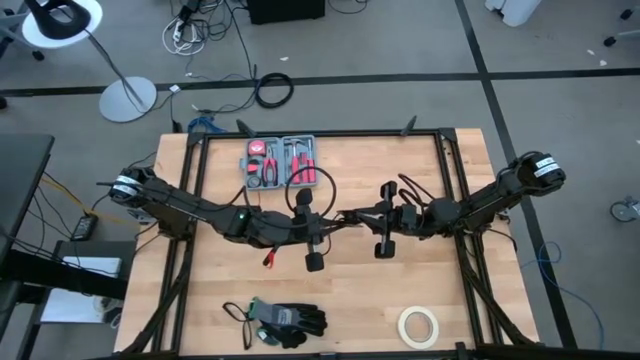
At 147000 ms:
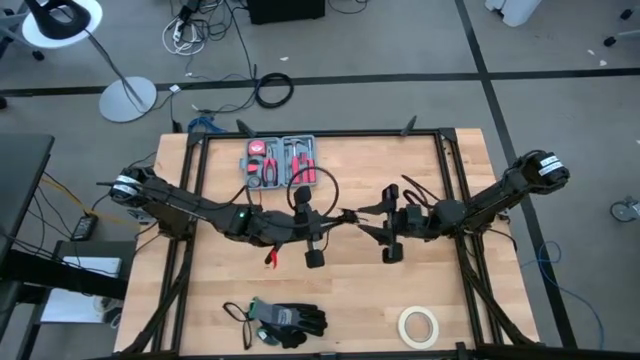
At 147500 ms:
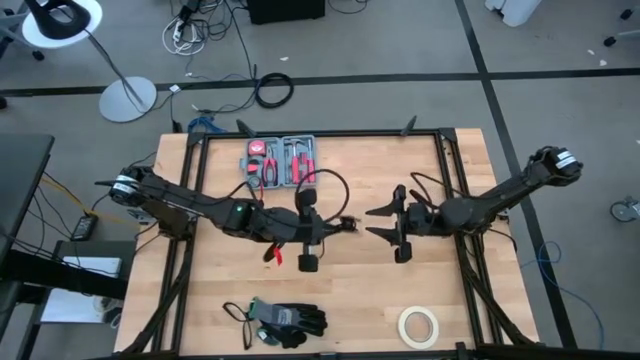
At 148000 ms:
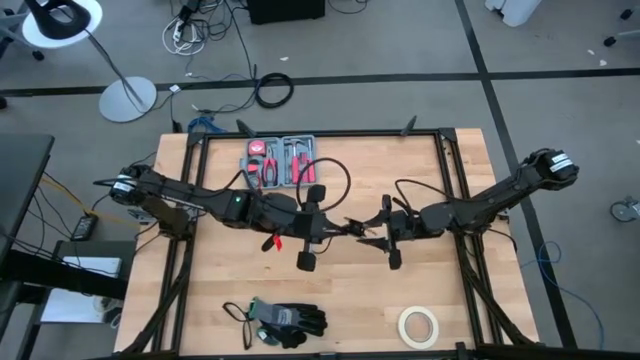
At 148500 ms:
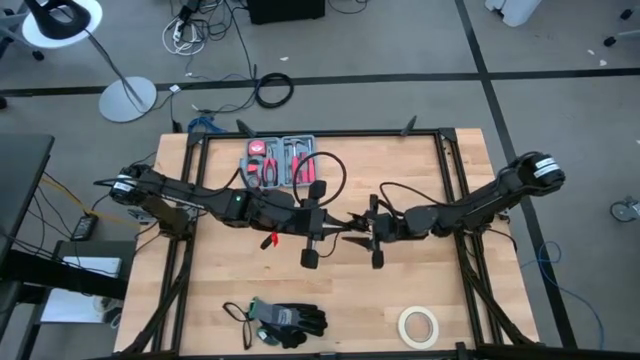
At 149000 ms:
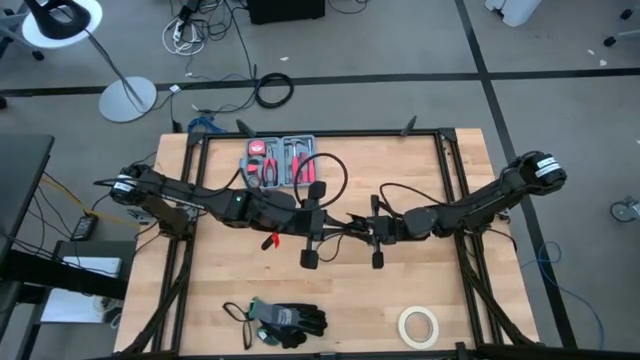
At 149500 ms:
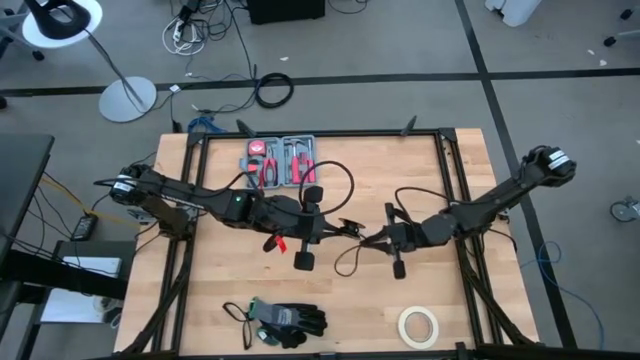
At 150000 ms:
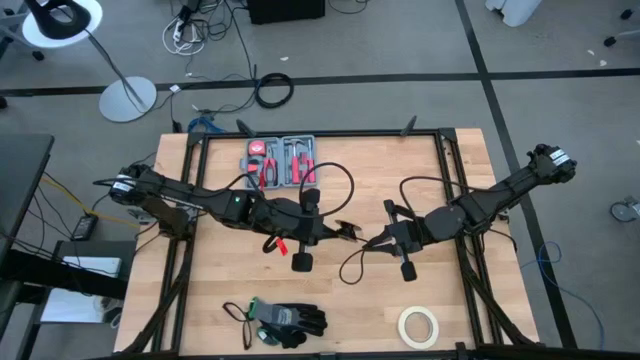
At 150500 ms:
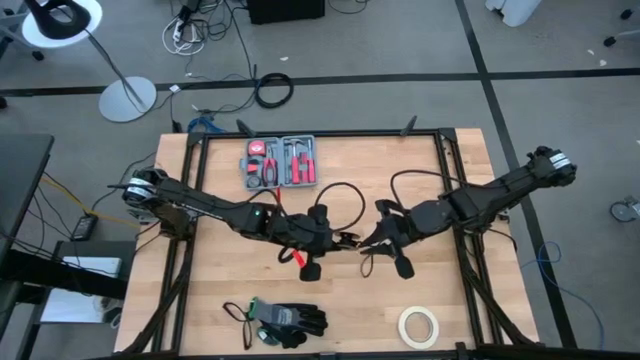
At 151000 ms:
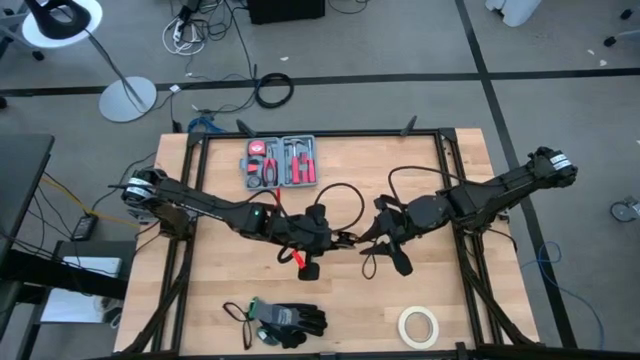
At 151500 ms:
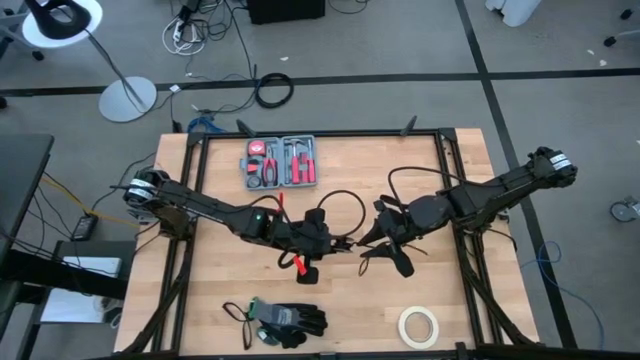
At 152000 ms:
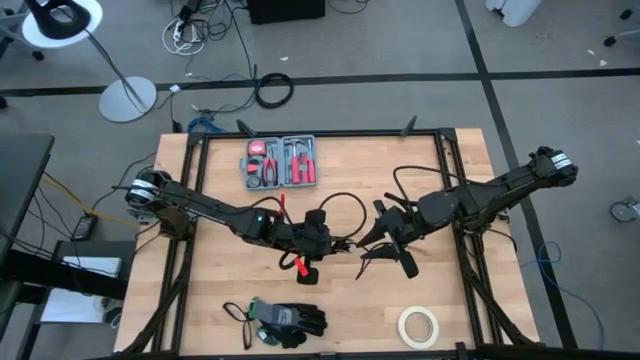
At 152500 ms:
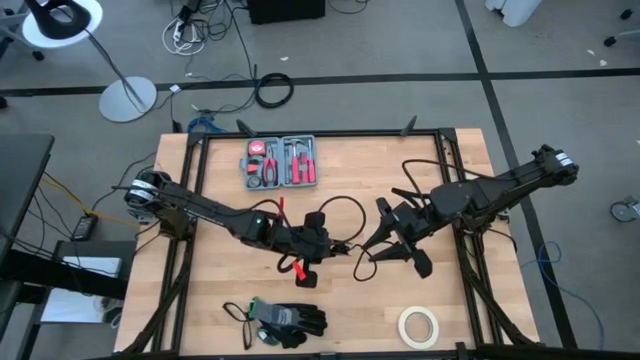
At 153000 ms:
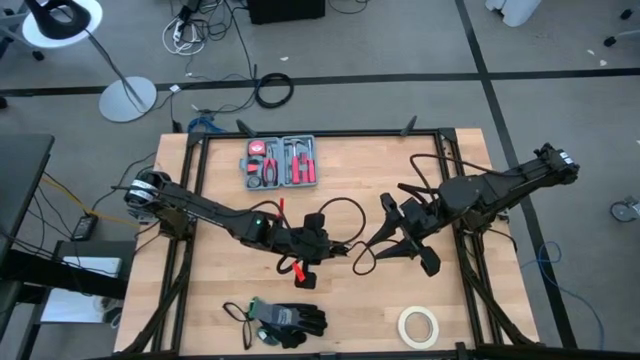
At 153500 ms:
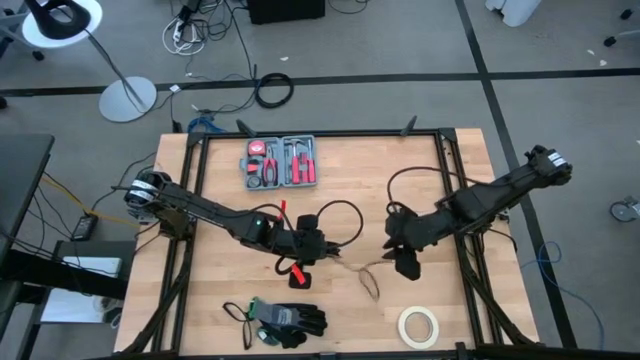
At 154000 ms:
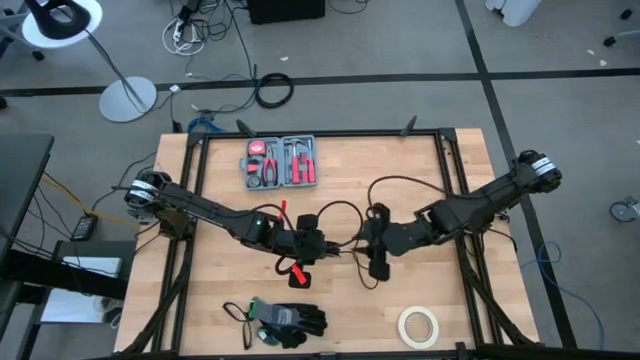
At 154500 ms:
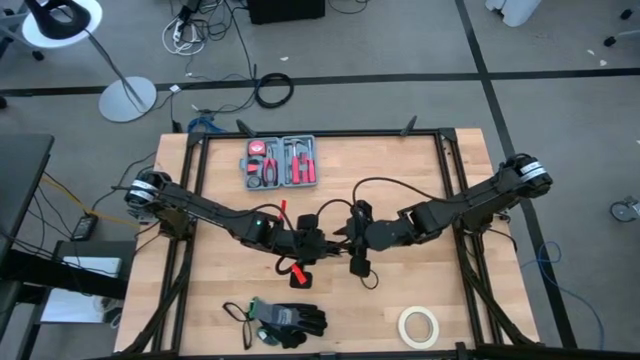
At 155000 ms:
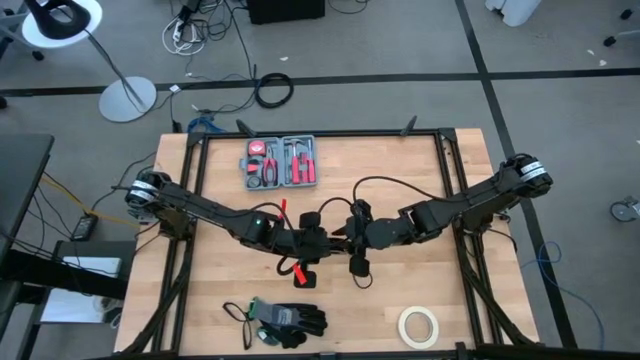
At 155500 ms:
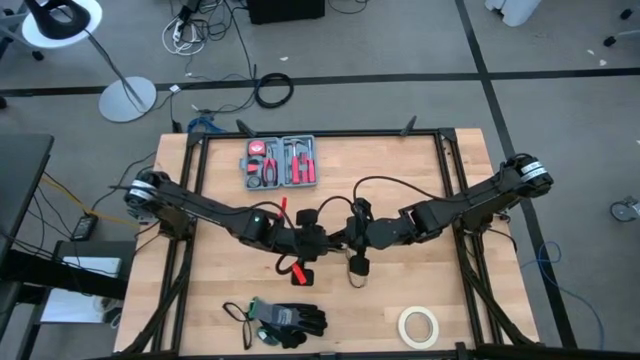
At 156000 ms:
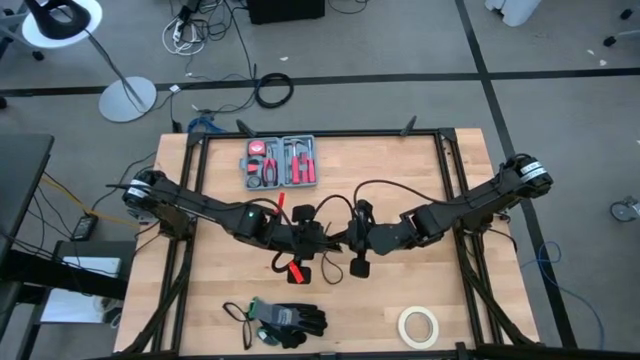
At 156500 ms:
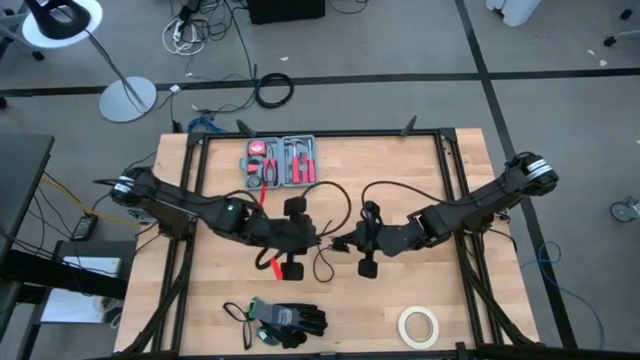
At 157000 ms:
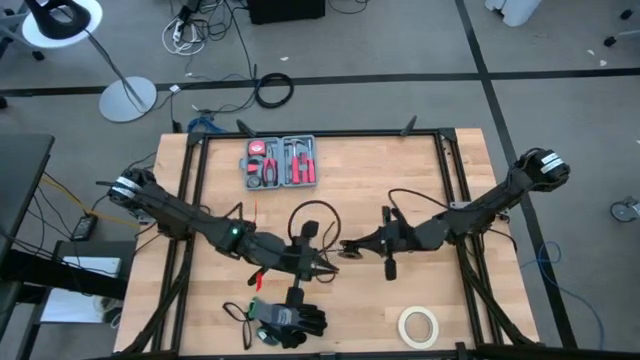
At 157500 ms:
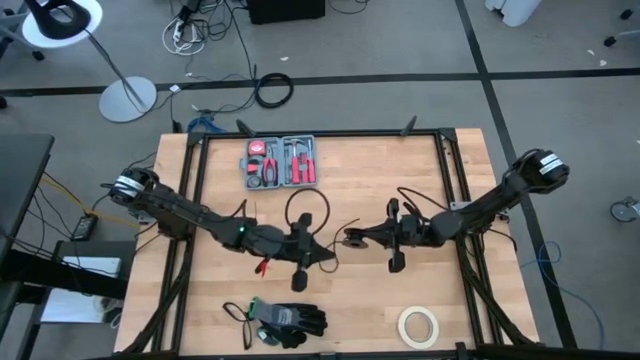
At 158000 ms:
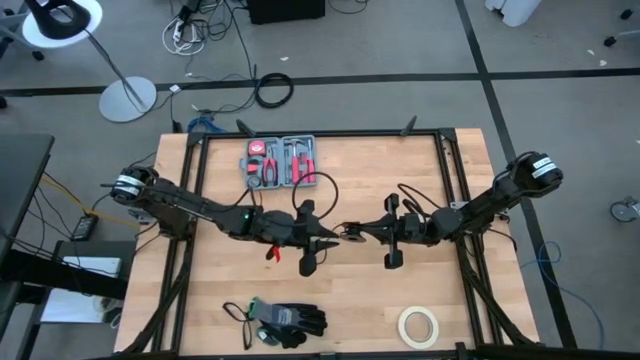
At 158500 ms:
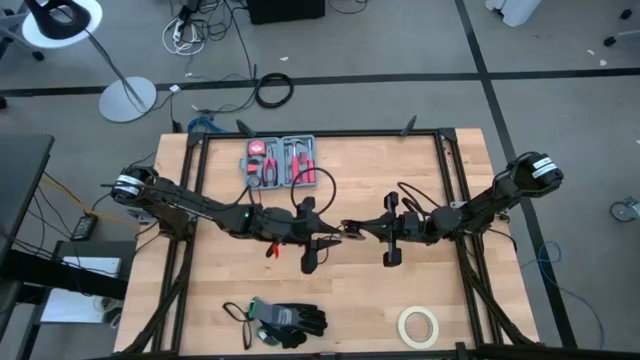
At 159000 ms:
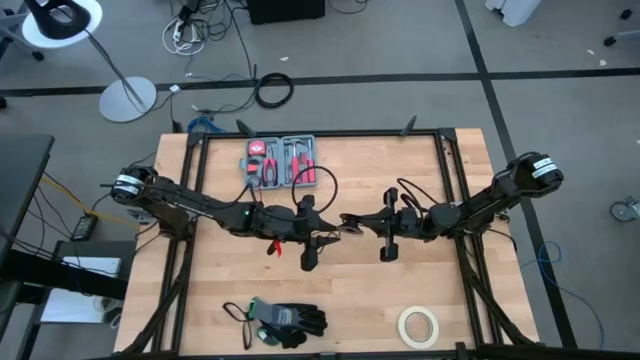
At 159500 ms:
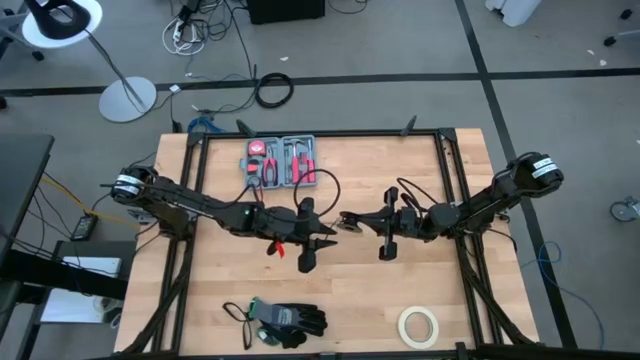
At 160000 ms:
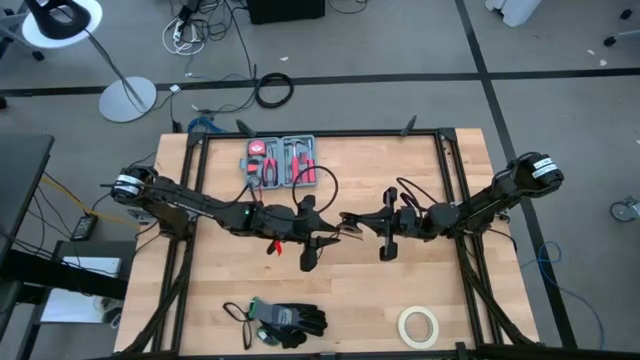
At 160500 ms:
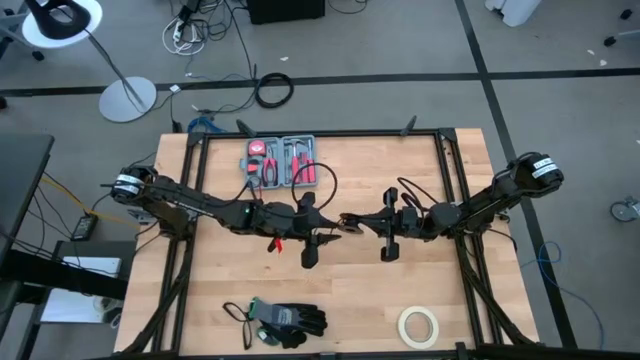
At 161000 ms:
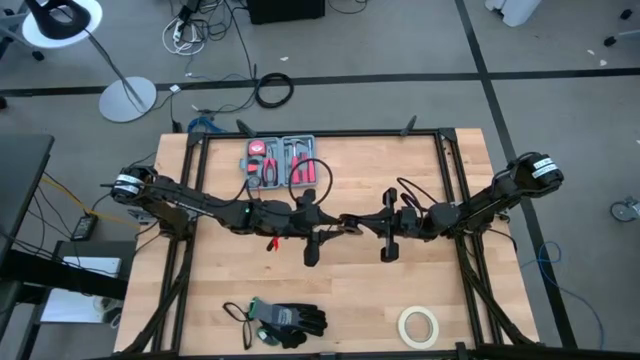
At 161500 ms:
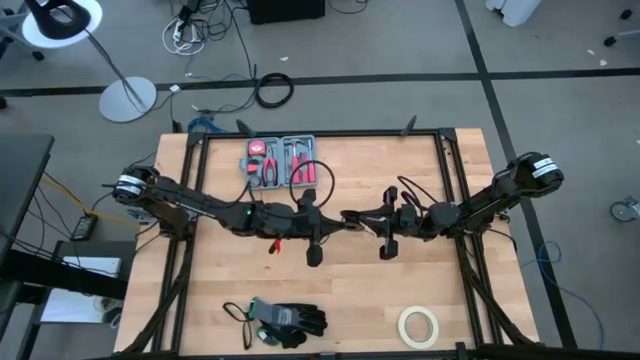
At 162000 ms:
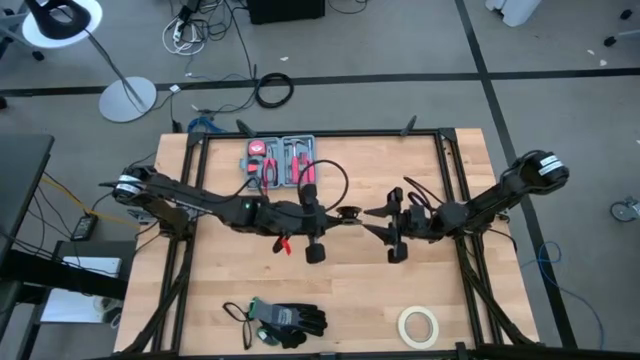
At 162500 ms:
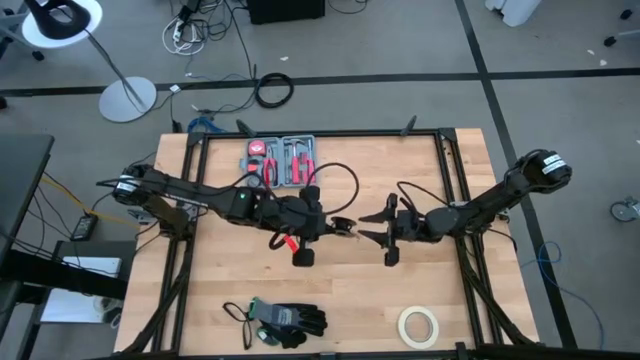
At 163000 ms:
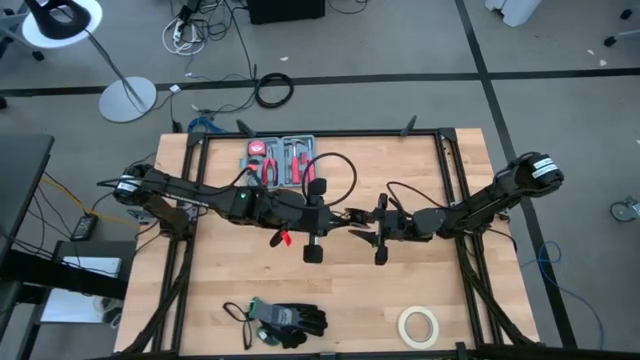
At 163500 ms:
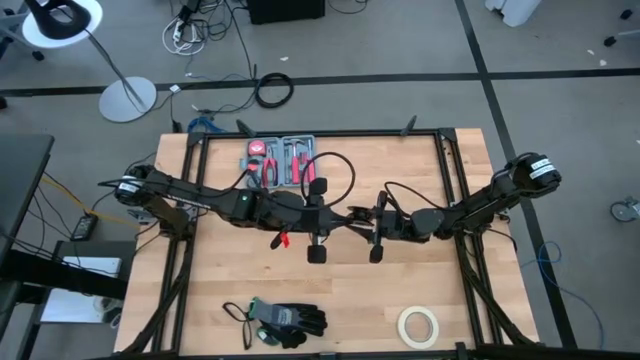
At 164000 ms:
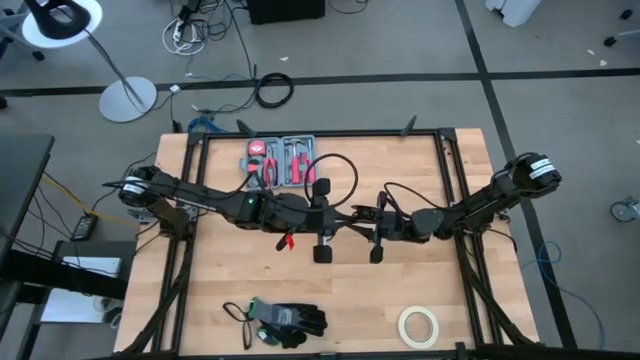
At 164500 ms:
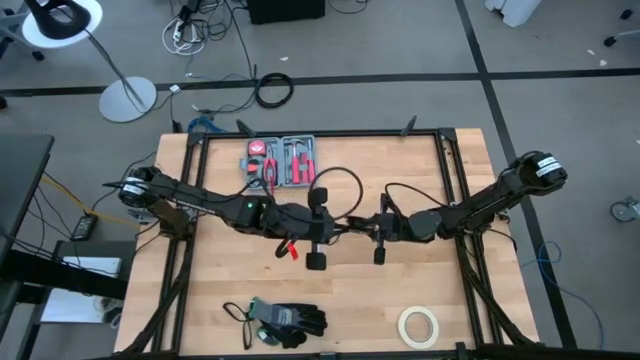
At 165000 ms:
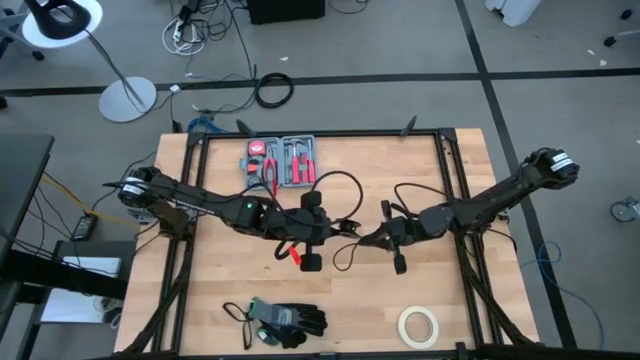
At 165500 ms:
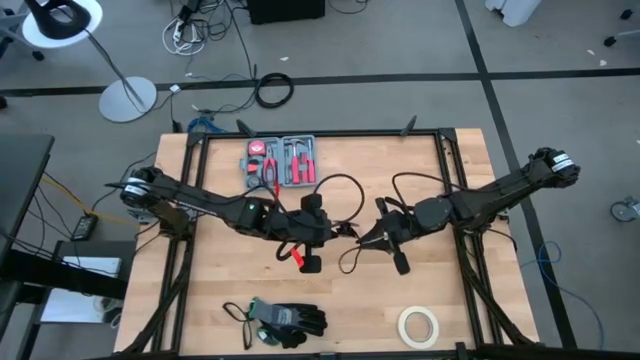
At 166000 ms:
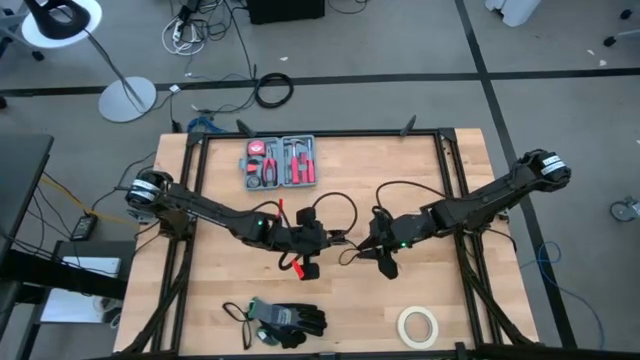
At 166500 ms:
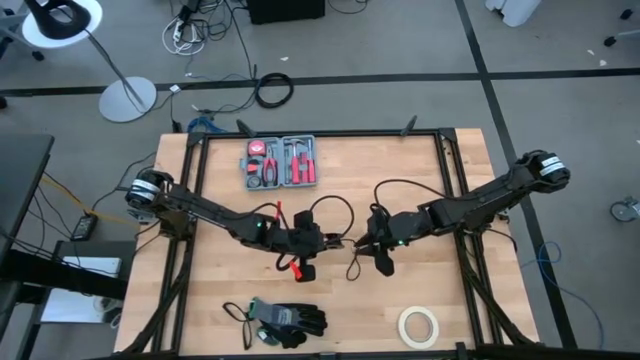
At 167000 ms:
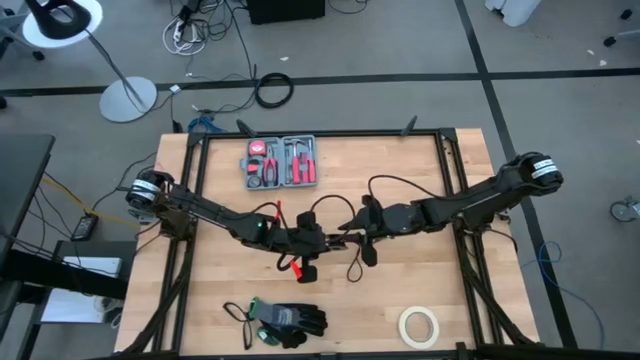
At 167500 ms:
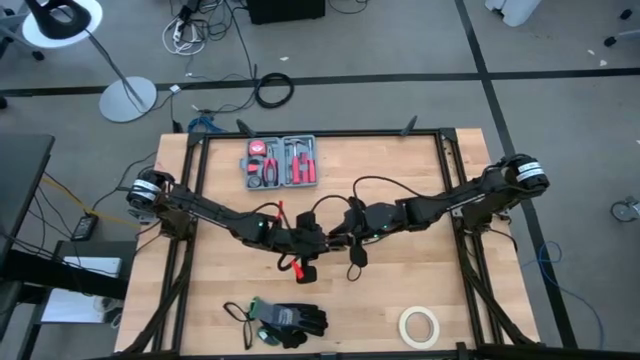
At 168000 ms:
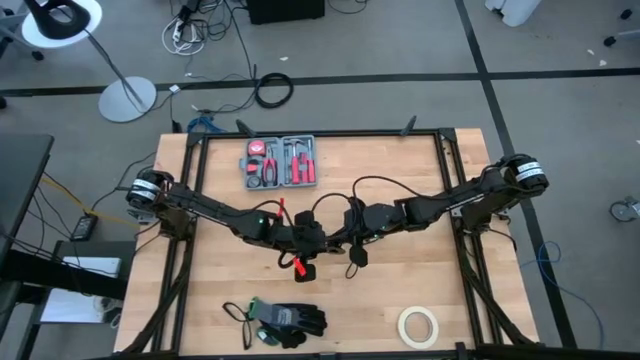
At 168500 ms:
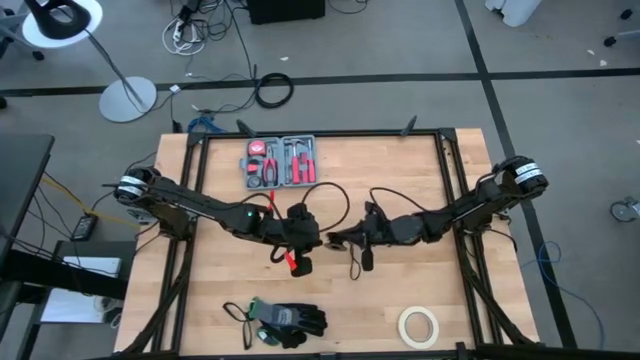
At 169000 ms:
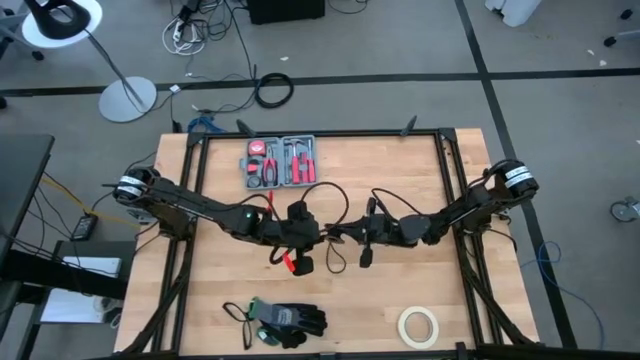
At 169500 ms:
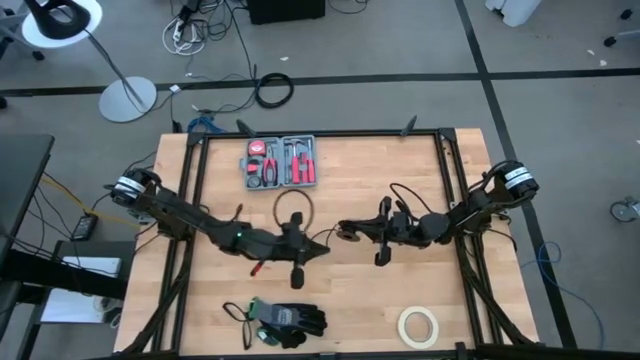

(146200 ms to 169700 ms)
Task: Coil cords
Coil the black wire cable into the black spool
